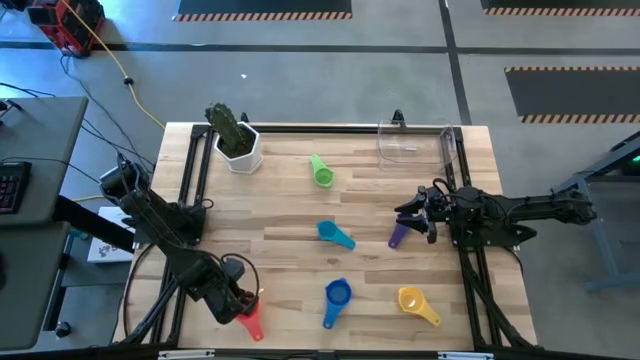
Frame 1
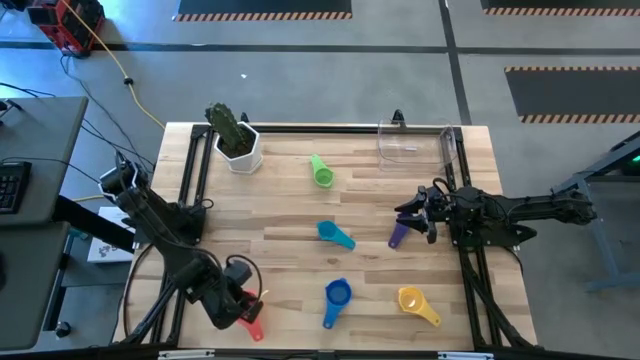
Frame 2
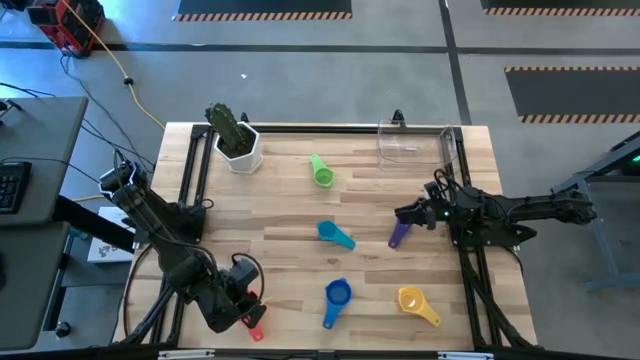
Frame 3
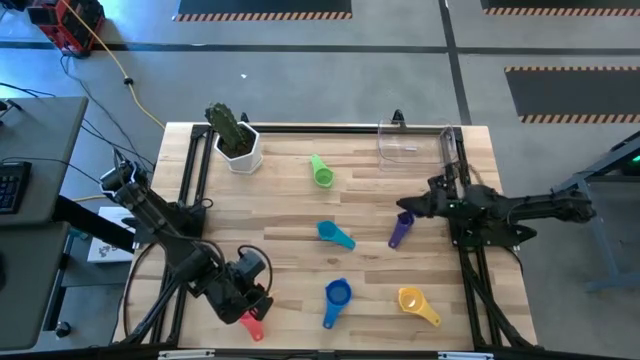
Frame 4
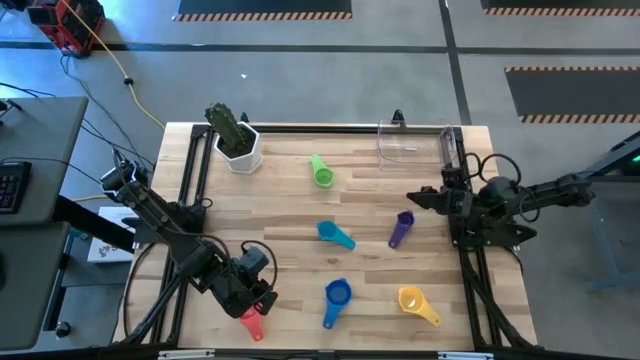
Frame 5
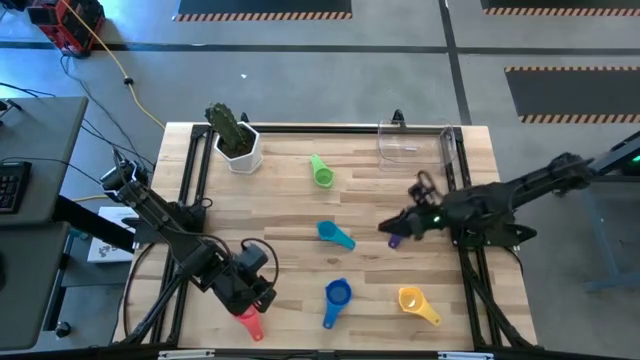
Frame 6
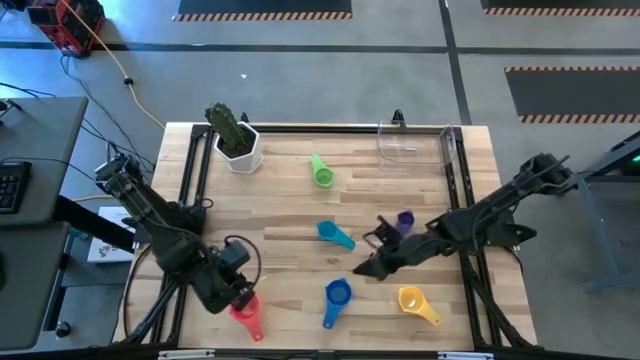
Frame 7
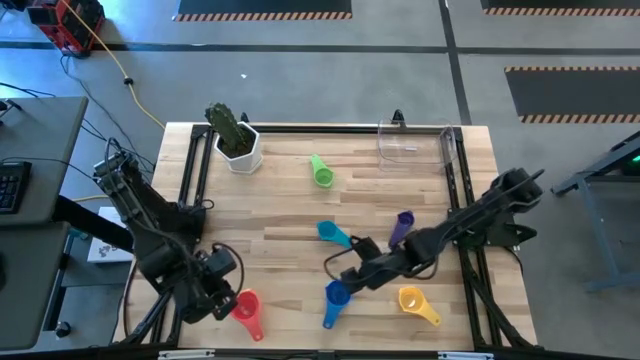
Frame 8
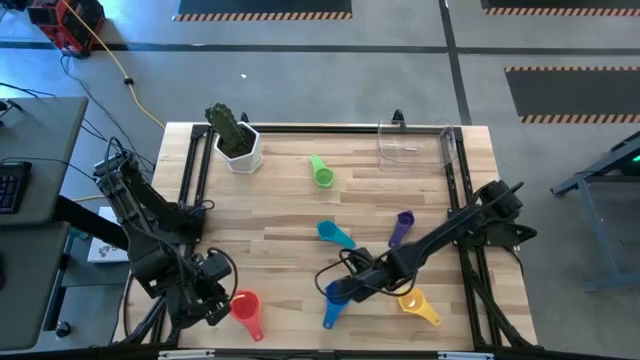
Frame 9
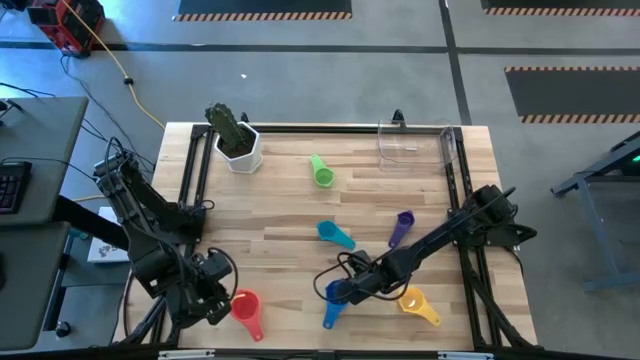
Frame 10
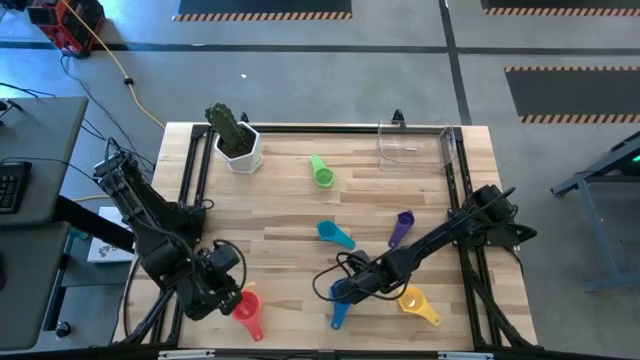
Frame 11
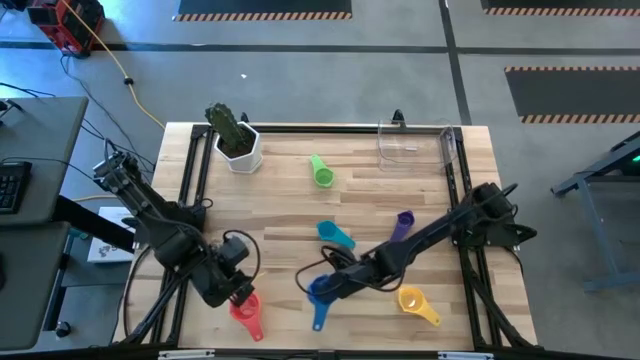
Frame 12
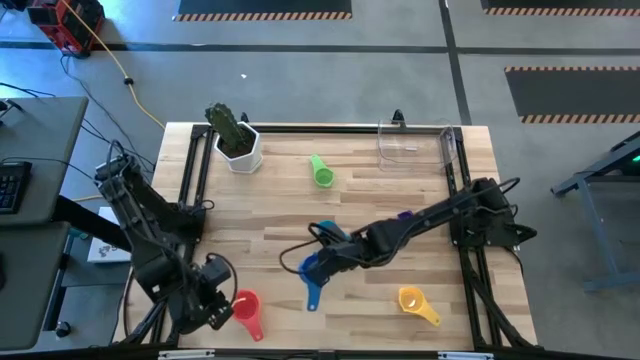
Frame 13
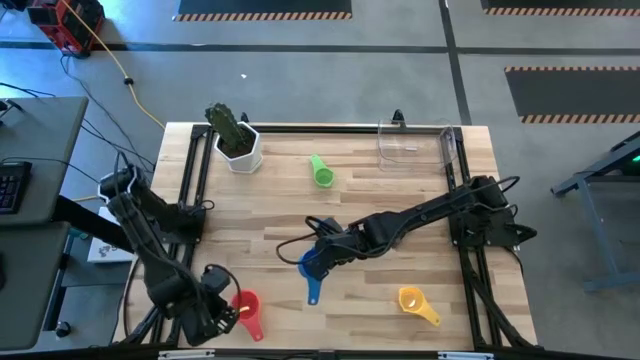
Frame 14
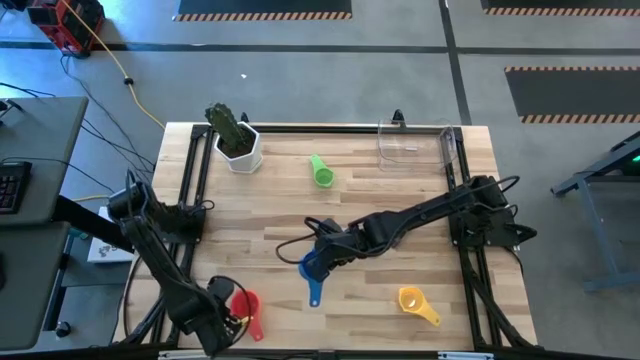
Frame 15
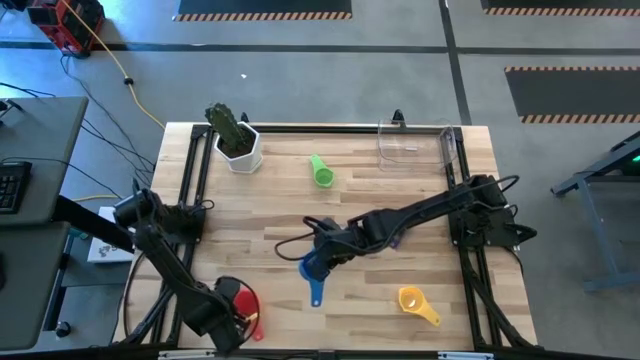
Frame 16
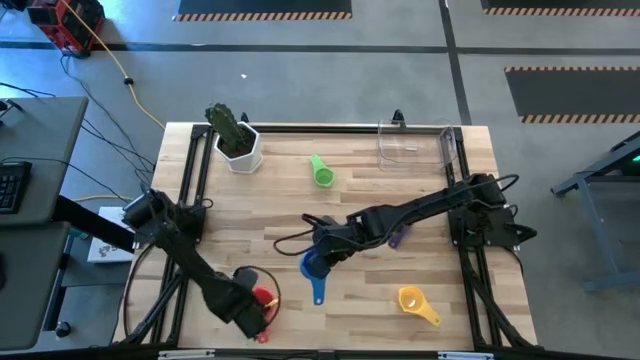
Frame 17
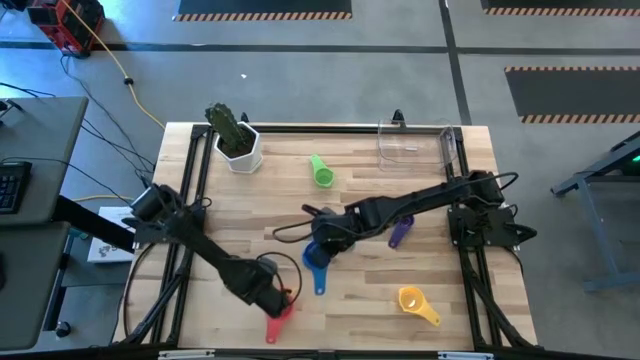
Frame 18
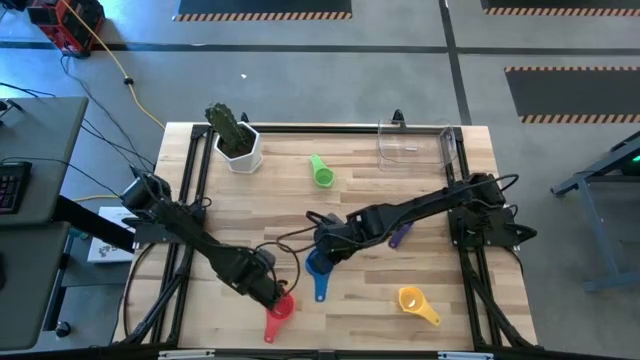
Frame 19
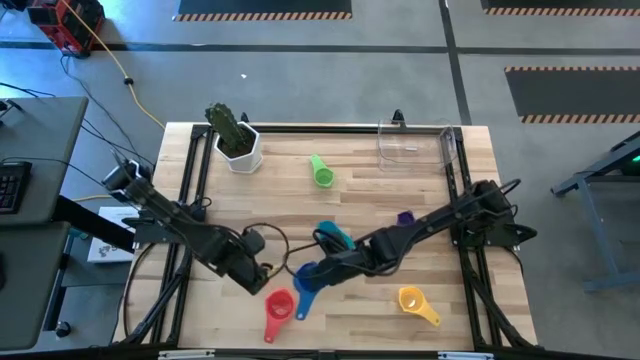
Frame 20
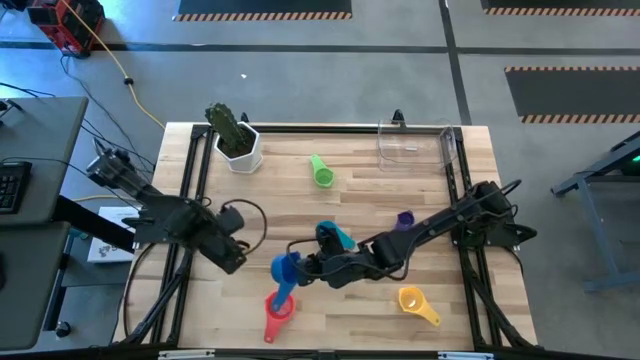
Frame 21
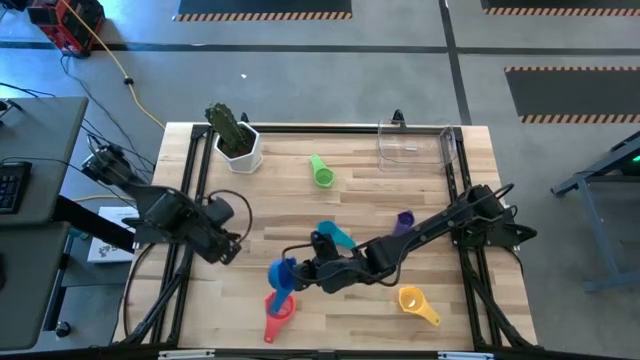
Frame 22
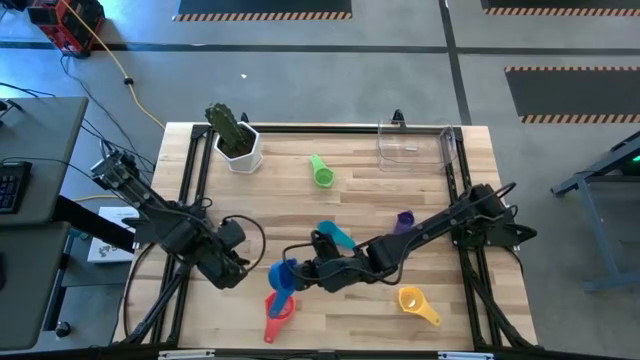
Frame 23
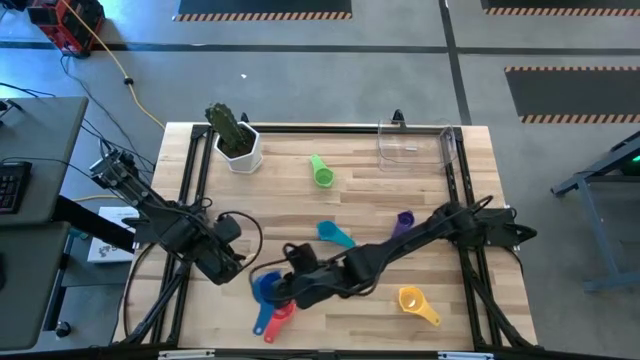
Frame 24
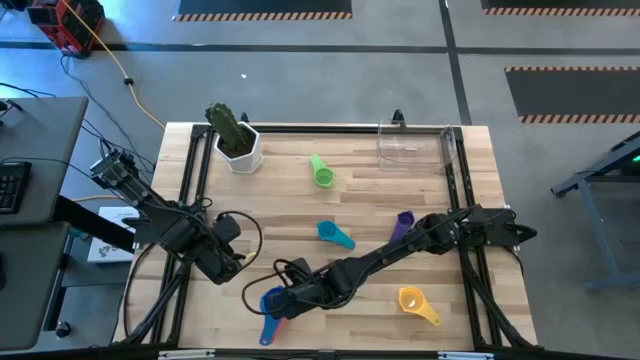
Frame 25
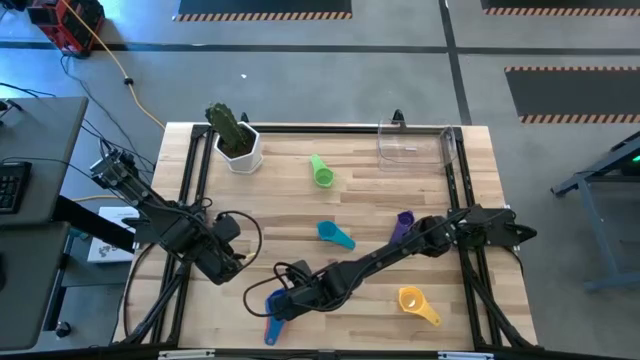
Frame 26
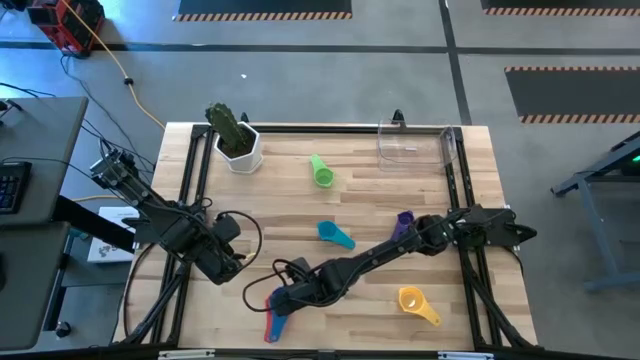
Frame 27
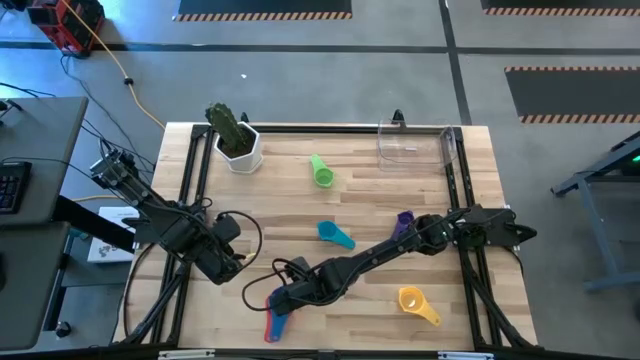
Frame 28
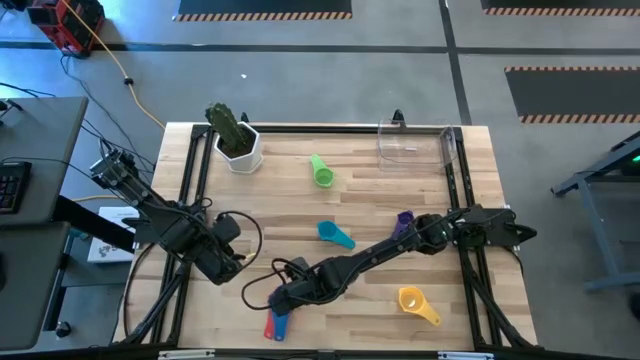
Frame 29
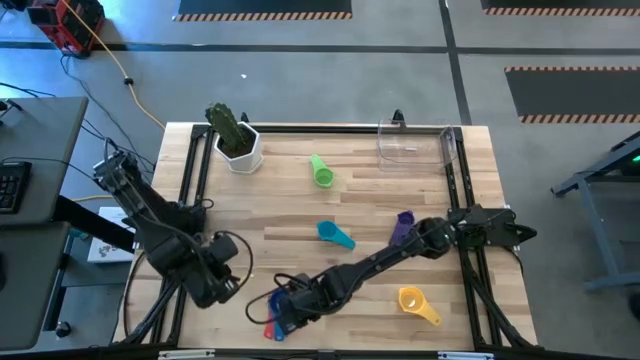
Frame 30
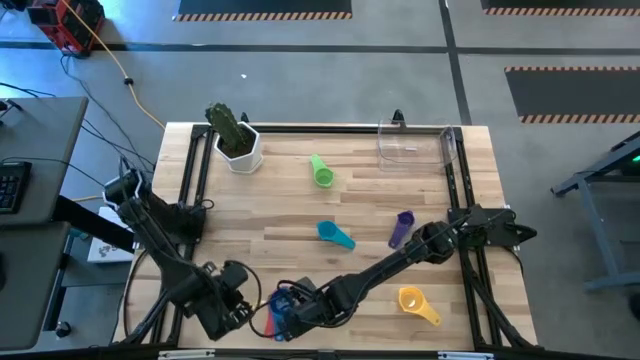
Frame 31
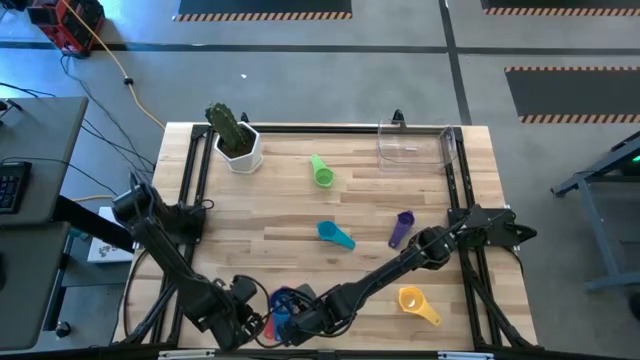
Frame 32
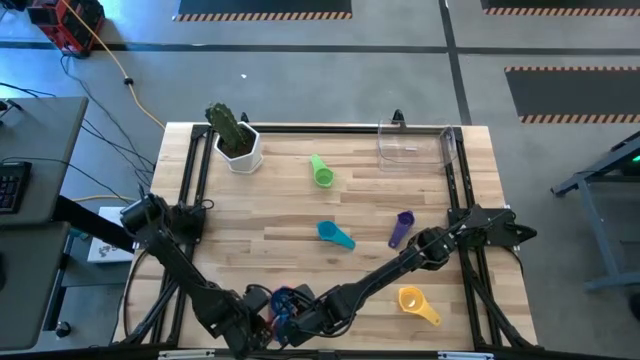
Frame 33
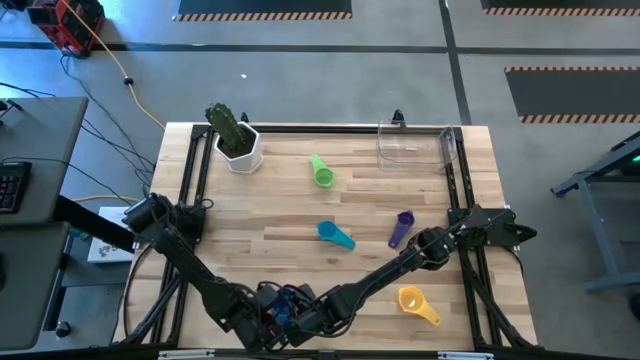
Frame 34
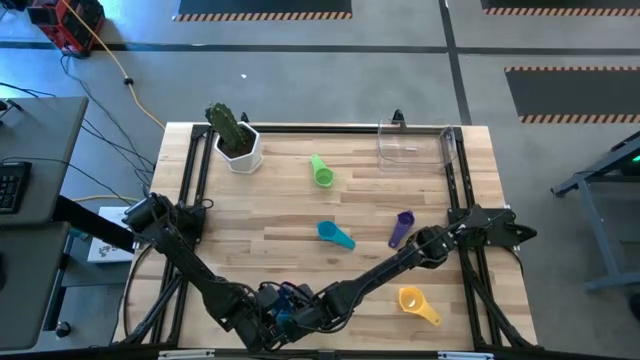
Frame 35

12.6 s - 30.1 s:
Task: Nest measuring cups in basket
Stack the blue measuring cup on the pink measuring cup

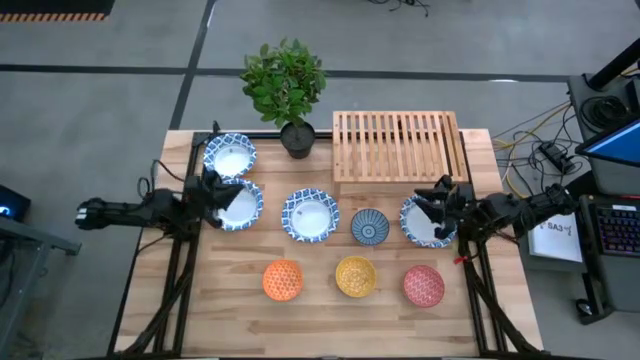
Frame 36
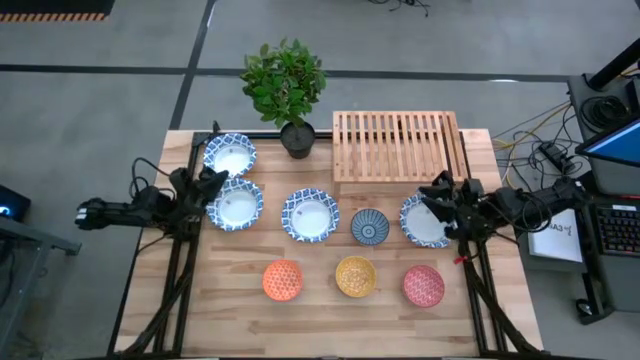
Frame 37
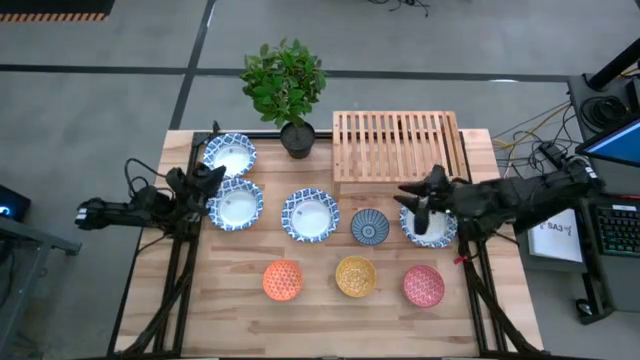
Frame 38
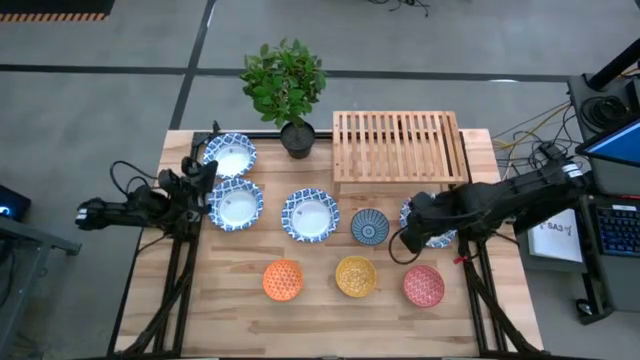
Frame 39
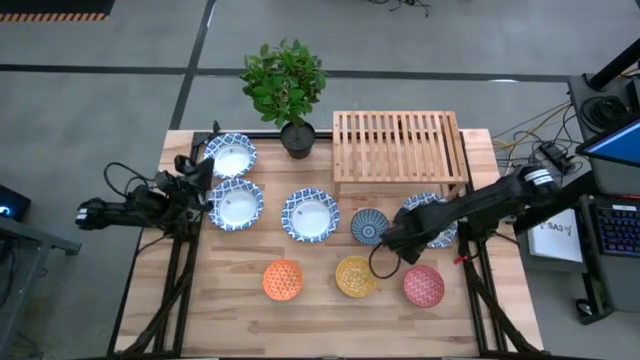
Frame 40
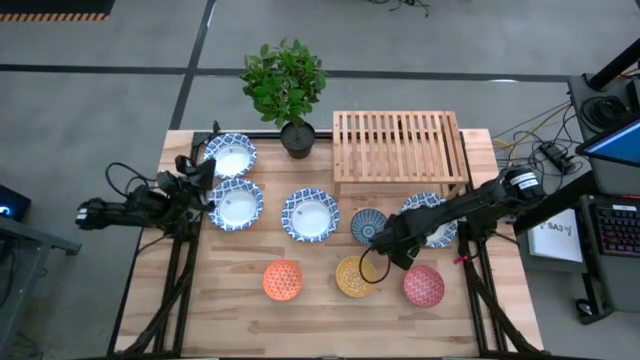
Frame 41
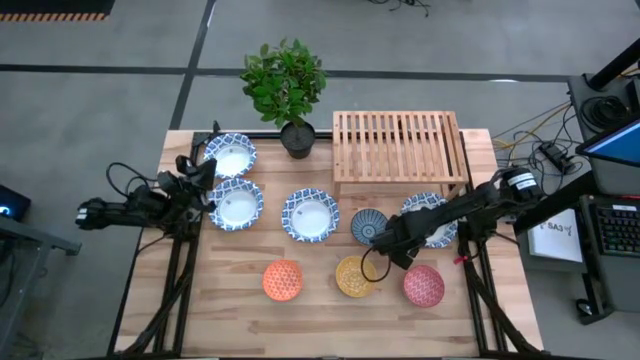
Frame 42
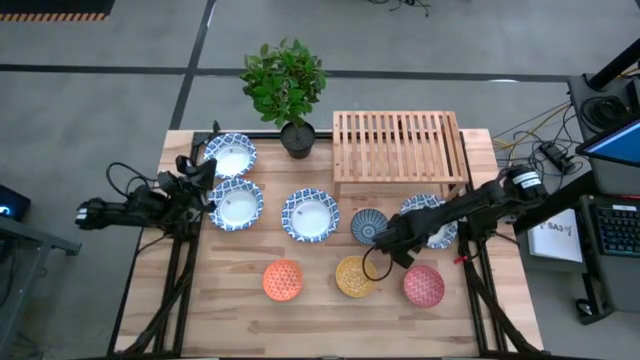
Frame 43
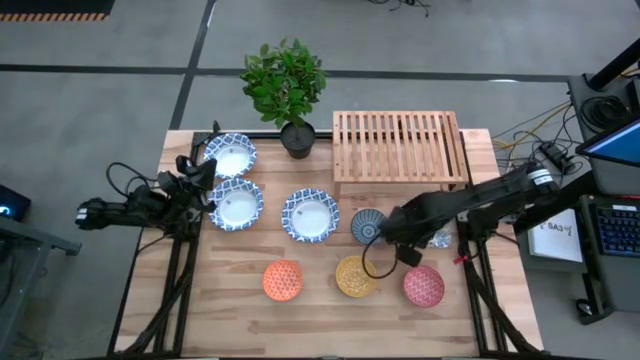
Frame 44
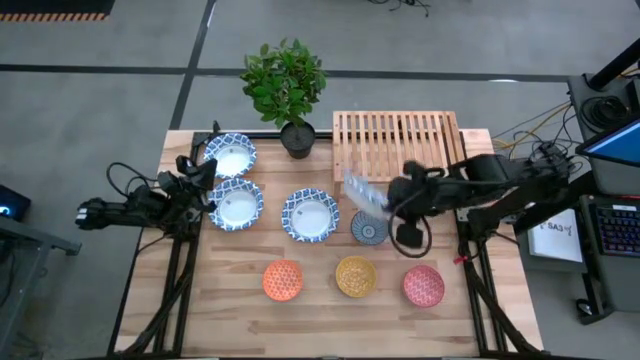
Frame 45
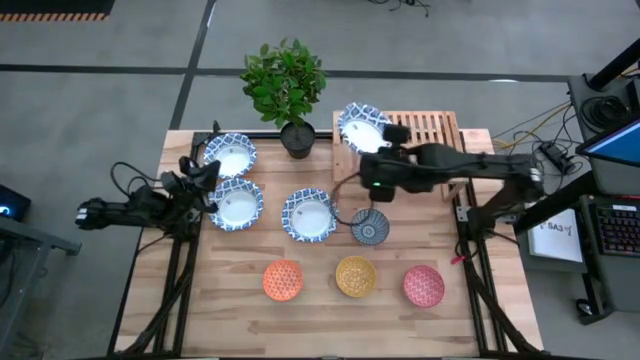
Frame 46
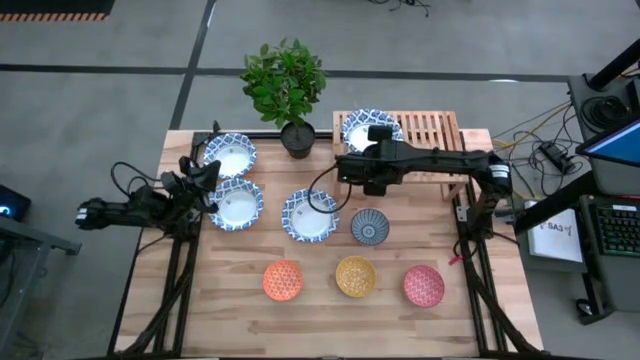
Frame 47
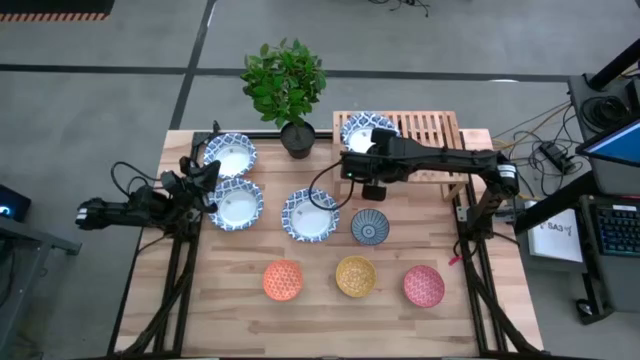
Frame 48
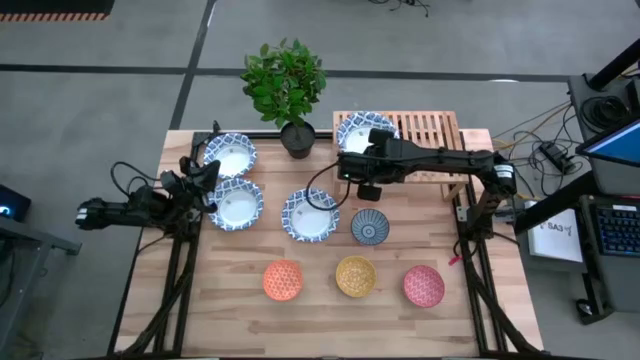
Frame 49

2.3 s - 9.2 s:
Task: Place and stack bowls onto a shelf
Put the white bowl on the shelf
